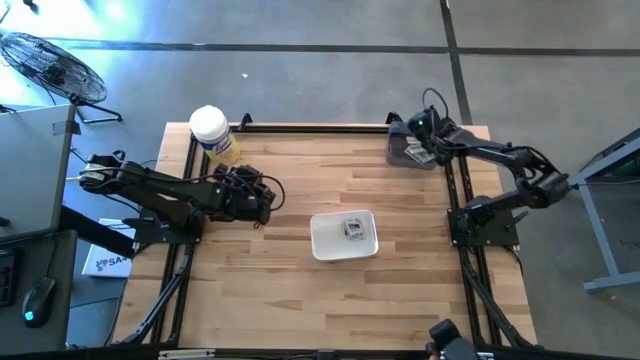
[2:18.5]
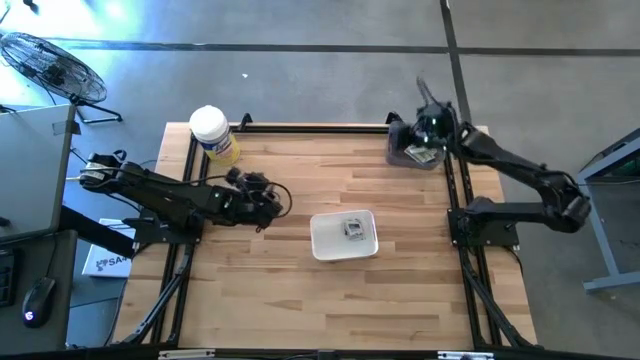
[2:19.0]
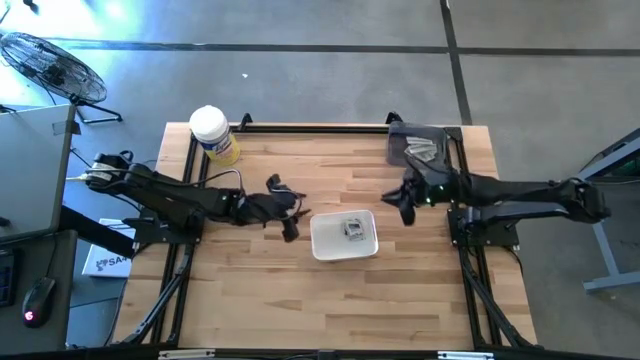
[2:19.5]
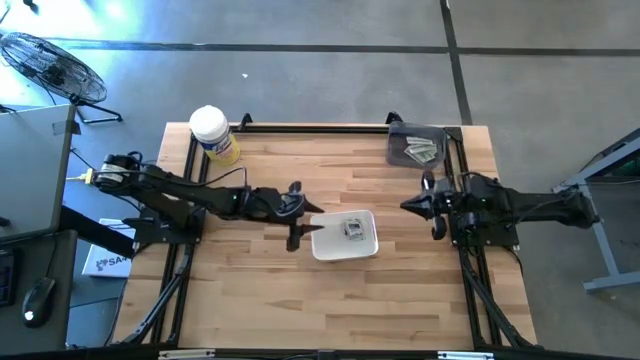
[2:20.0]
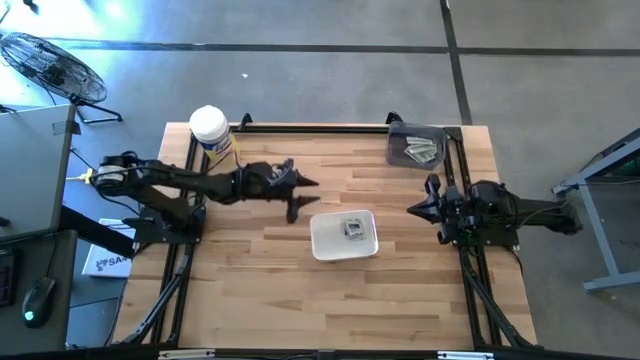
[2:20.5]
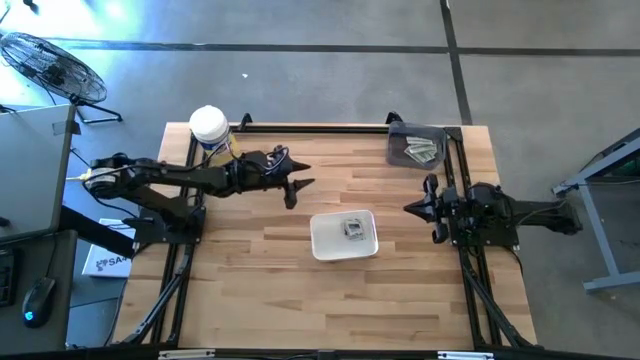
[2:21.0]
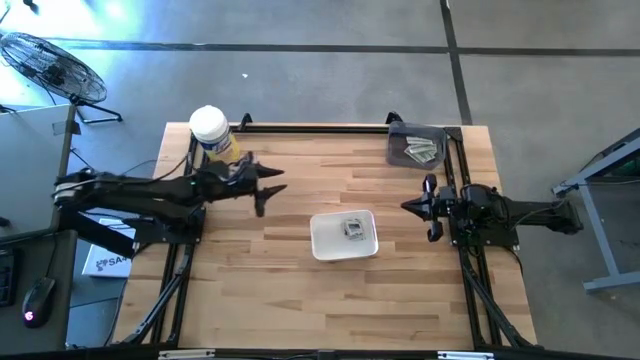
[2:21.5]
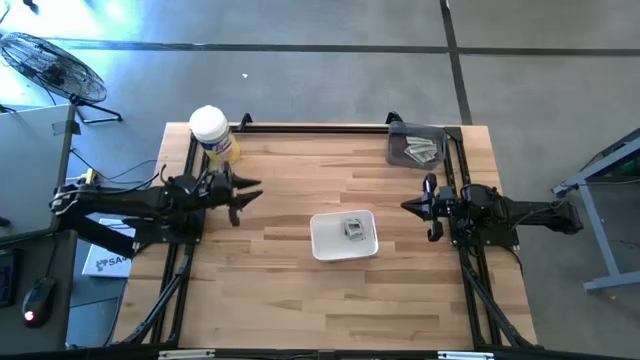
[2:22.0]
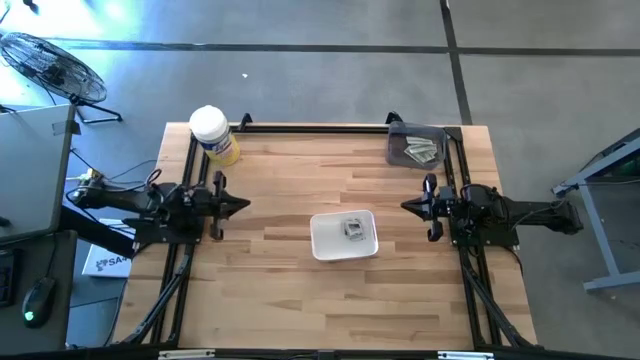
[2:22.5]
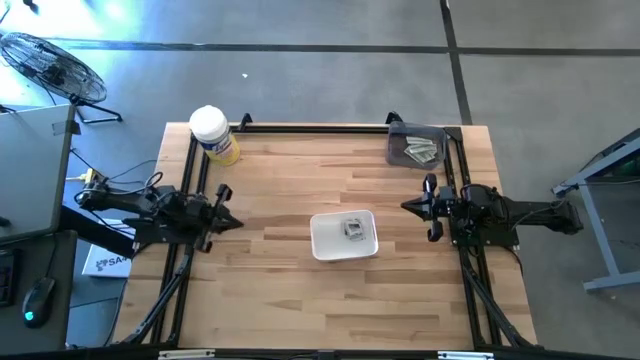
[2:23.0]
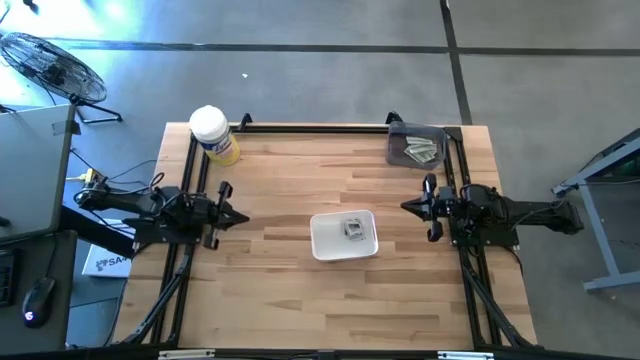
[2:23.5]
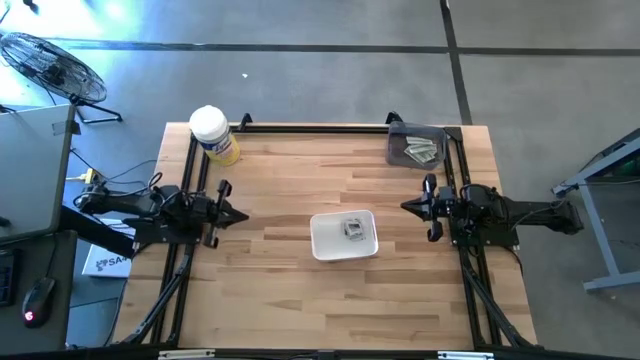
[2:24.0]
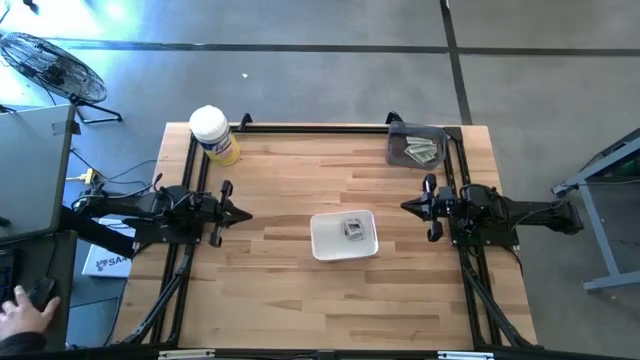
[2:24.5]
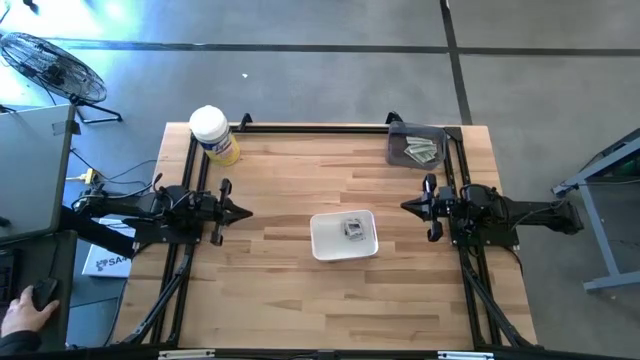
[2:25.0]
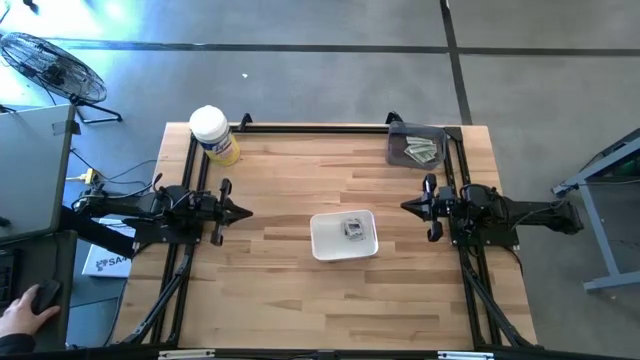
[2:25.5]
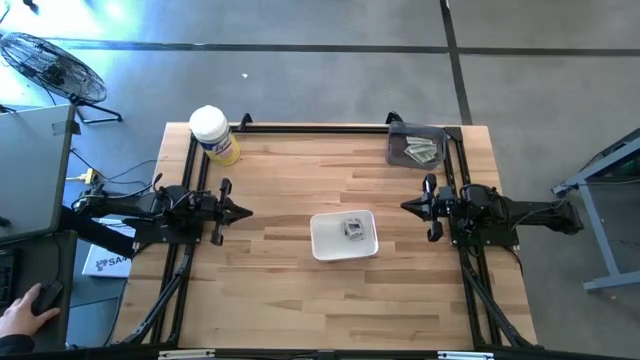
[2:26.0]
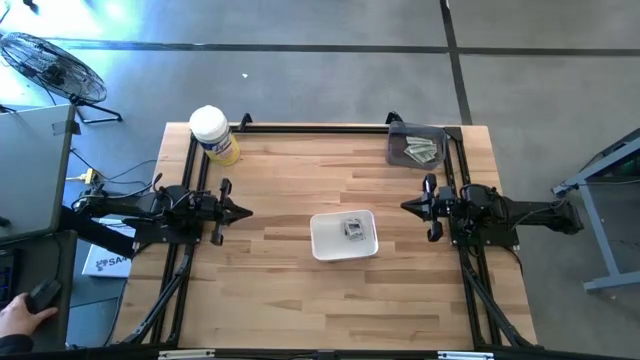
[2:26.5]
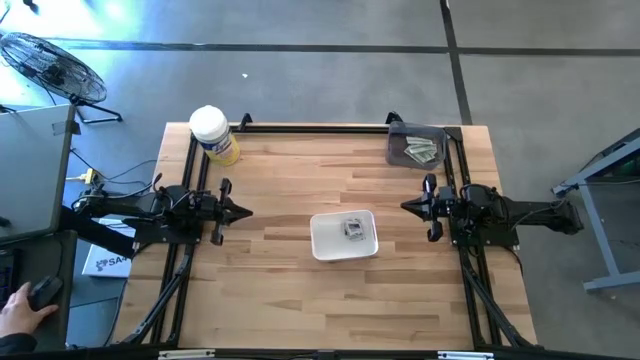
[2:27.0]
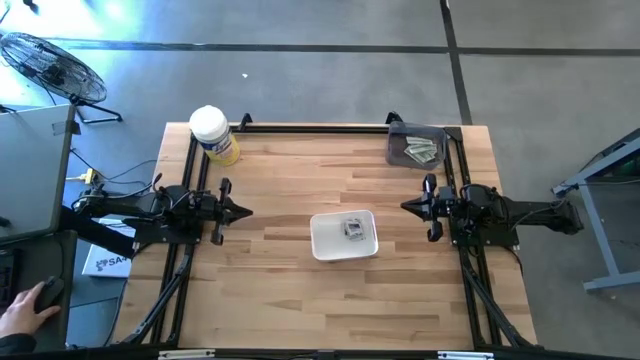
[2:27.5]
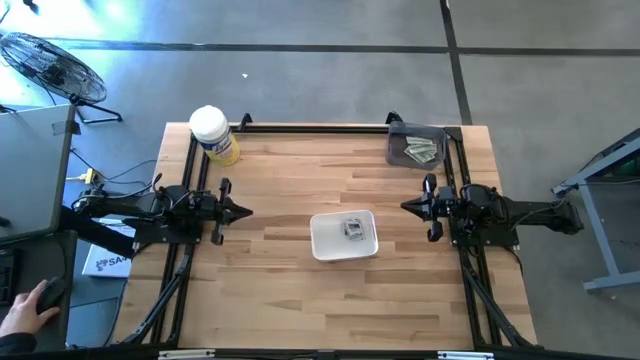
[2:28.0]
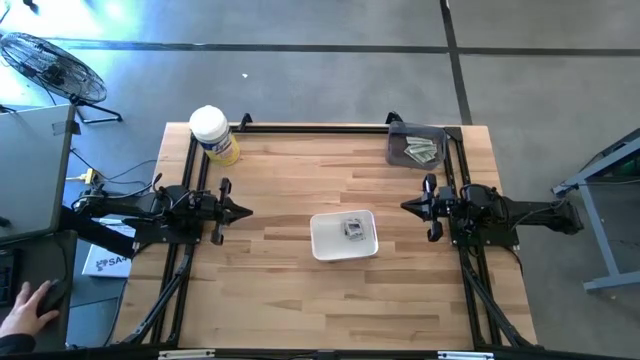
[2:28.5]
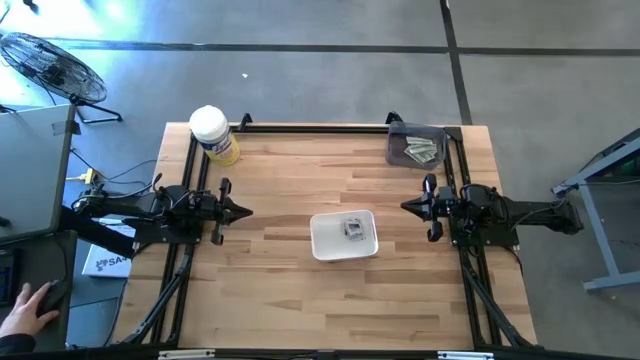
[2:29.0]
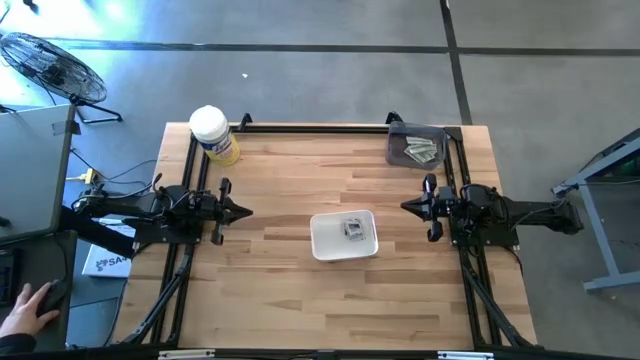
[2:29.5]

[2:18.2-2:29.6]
Task: Pick & Place First Aid Supplies
Return to Home Position

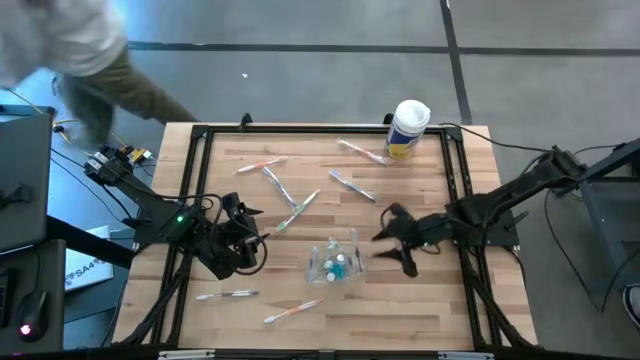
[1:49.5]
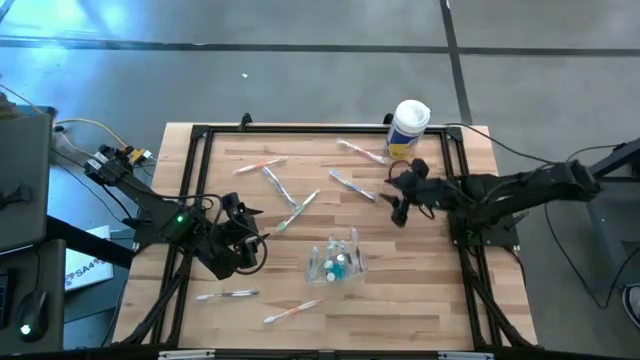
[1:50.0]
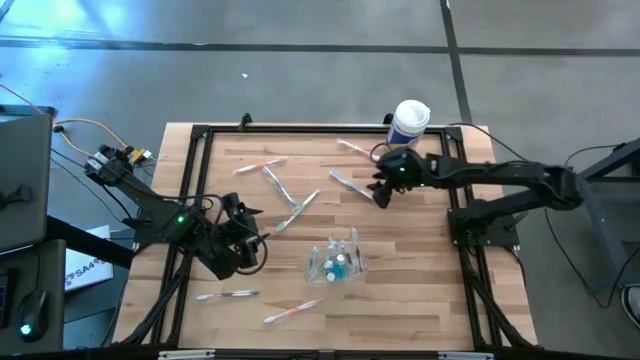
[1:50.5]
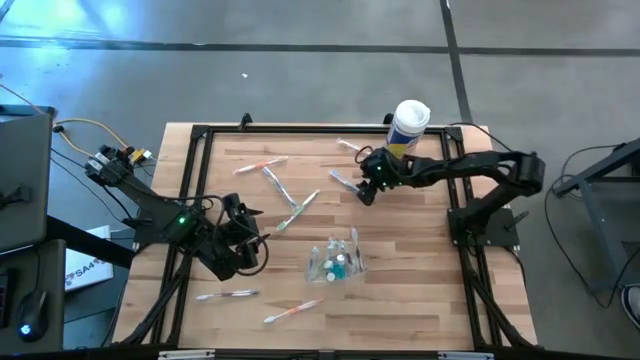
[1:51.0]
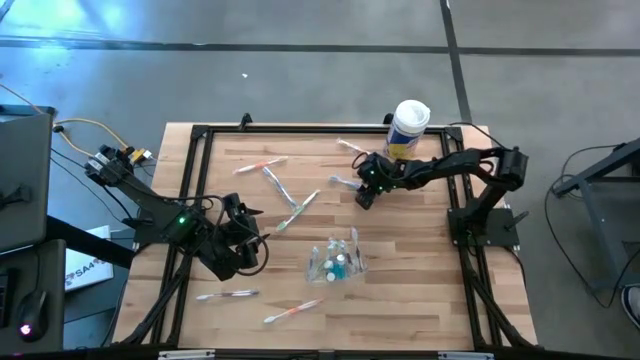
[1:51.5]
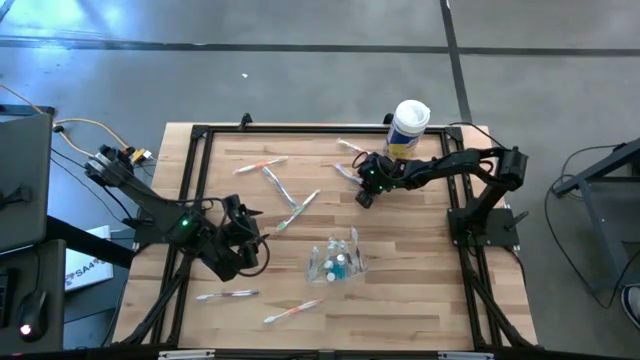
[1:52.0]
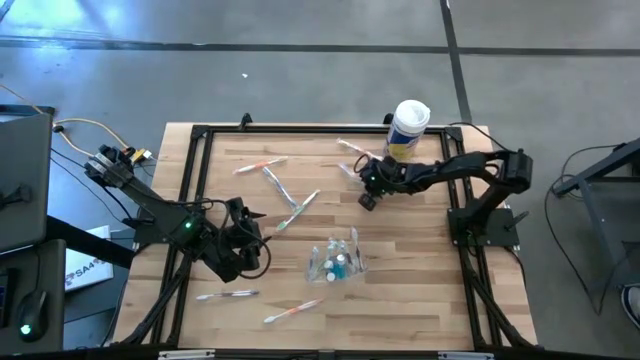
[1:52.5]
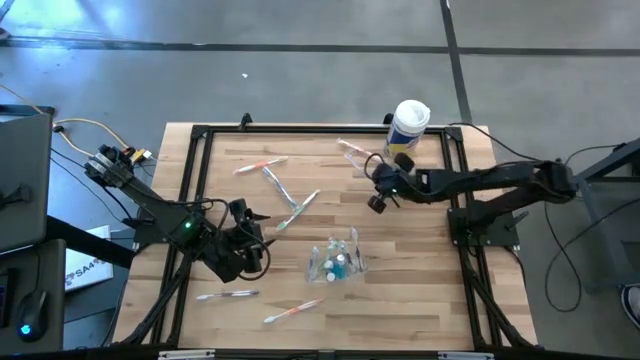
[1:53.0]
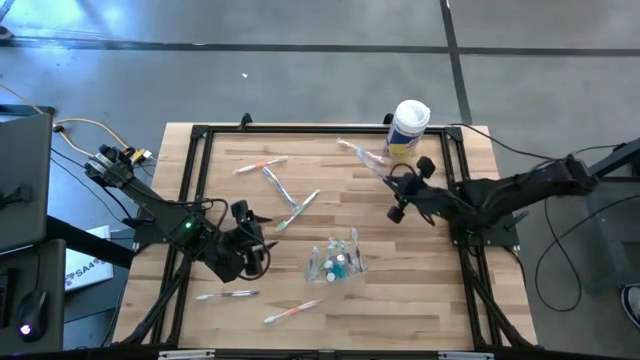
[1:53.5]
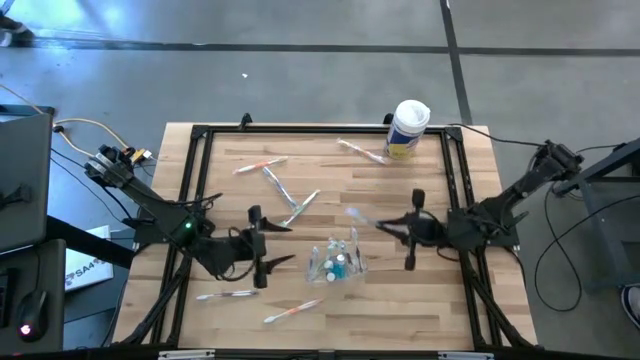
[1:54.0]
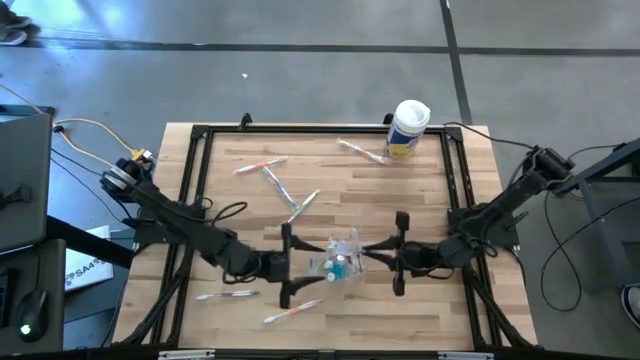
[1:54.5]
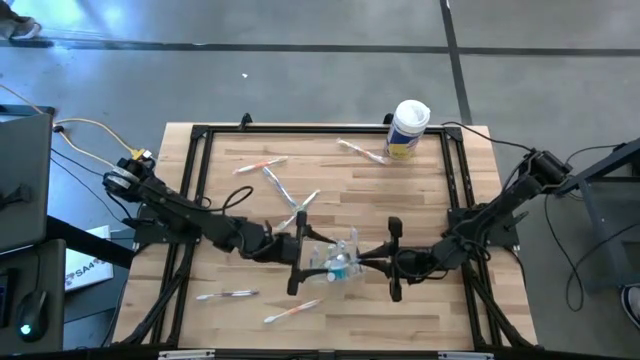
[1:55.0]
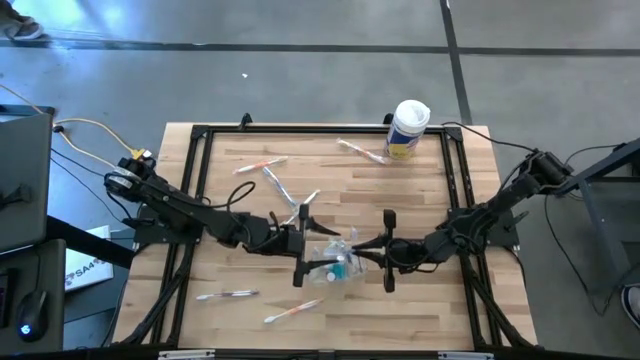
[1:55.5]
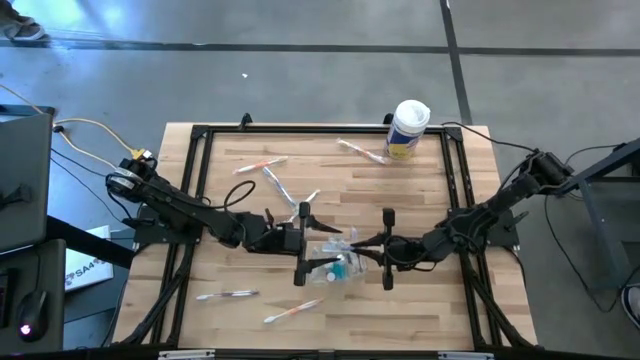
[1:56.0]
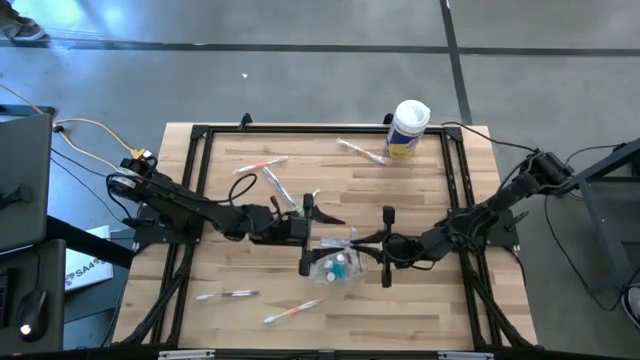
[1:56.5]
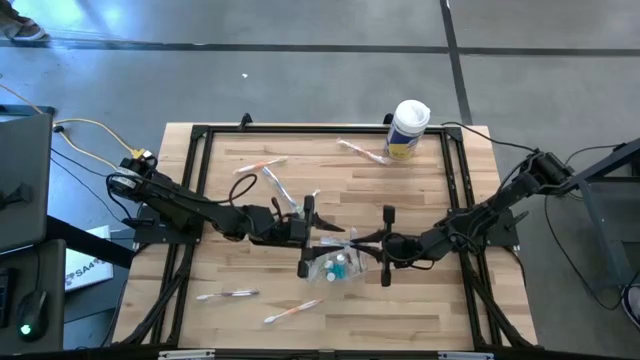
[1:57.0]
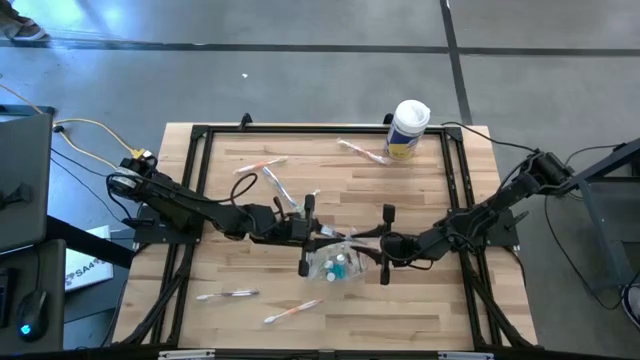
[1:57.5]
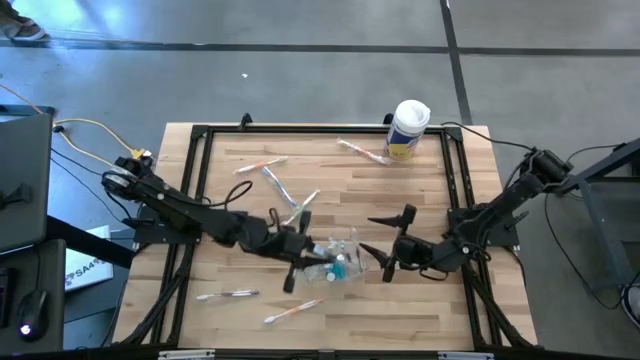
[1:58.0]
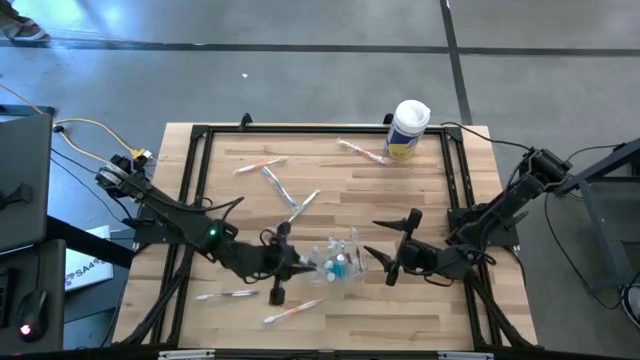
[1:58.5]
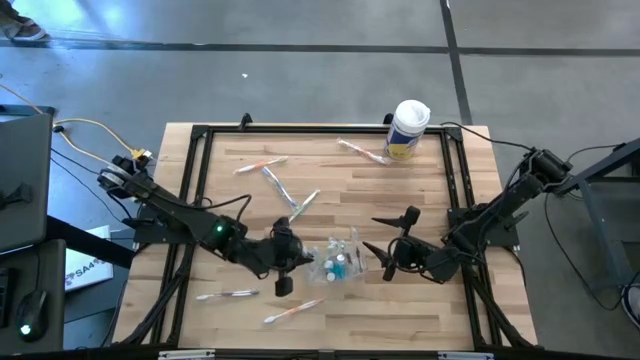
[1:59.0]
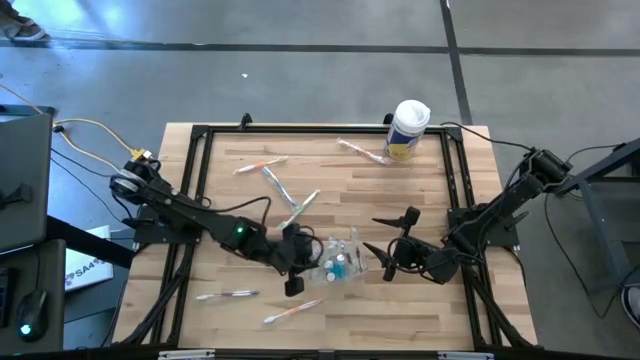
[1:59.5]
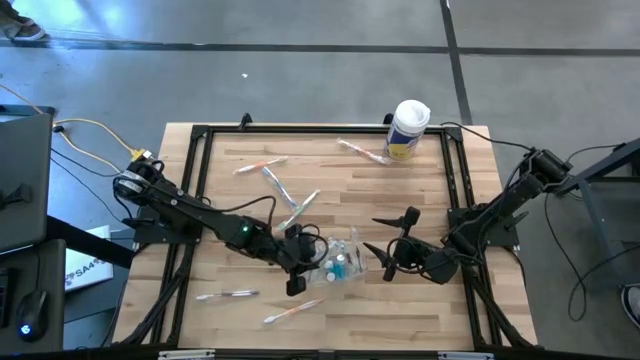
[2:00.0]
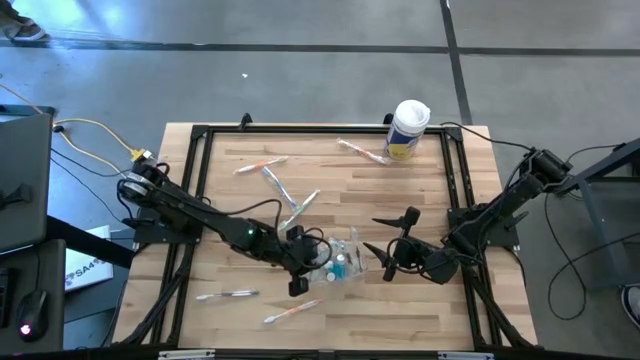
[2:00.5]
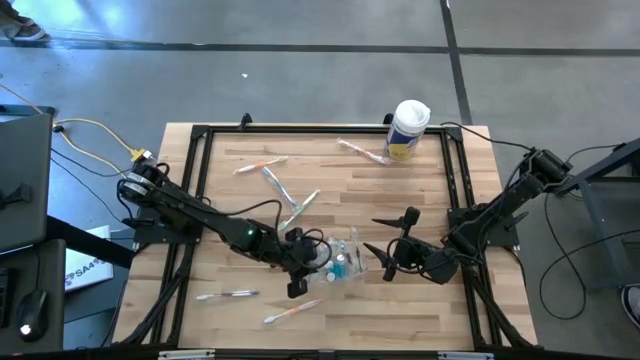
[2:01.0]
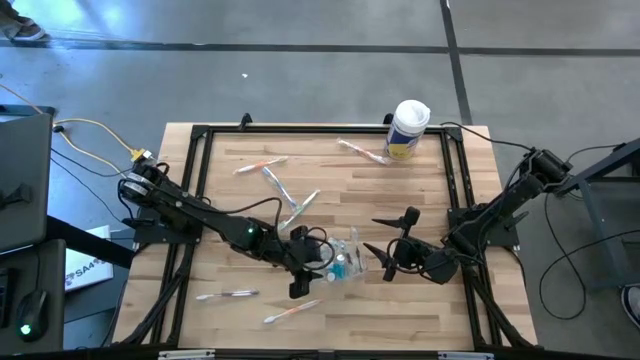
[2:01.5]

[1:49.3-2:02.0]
Task: Pick & Place toothbrushing station
Put the right blue toothbrush into the transparent organizer
